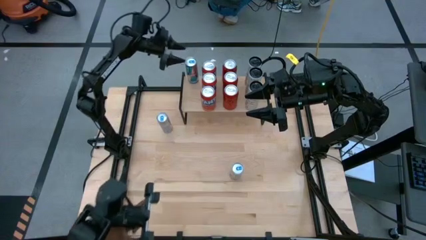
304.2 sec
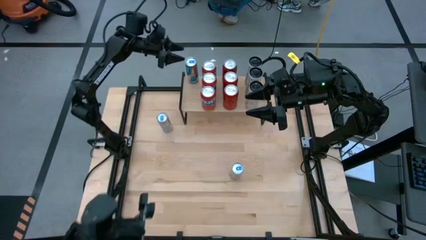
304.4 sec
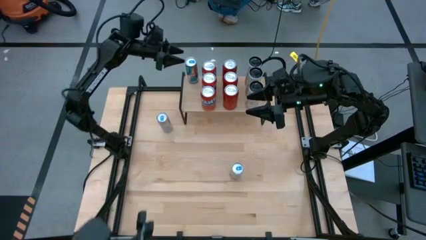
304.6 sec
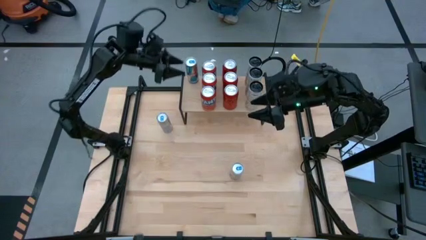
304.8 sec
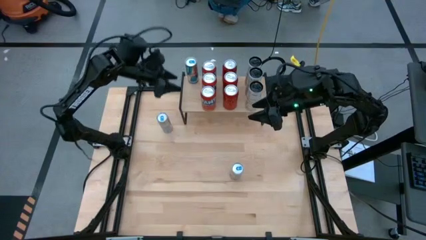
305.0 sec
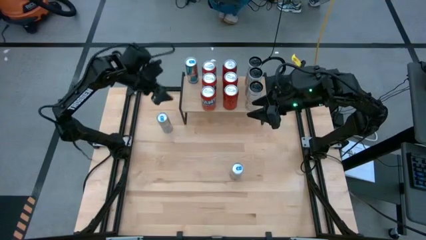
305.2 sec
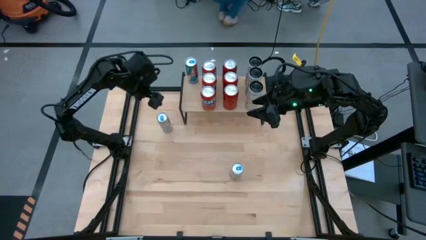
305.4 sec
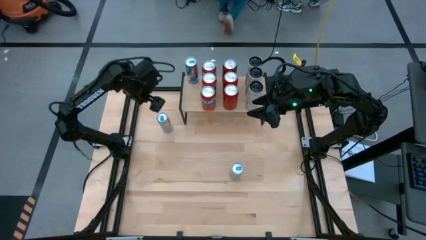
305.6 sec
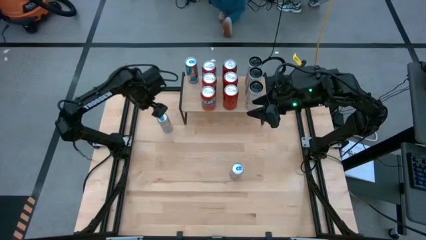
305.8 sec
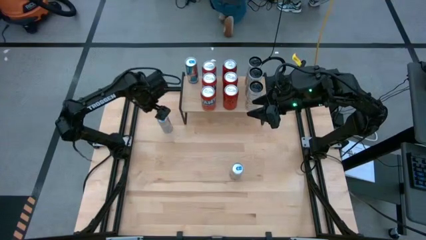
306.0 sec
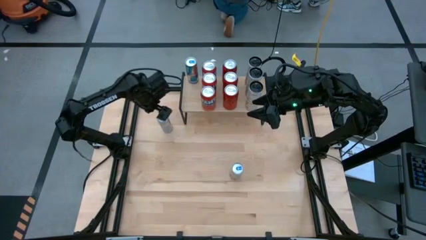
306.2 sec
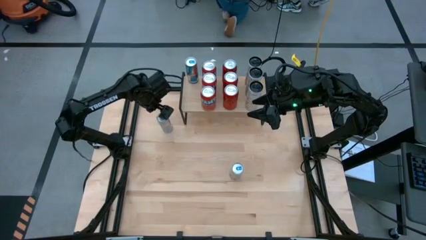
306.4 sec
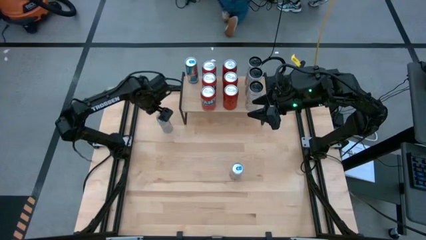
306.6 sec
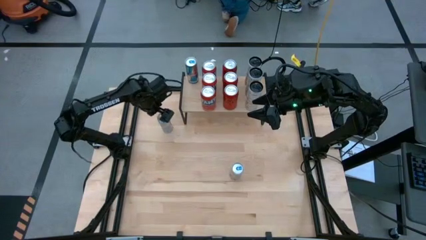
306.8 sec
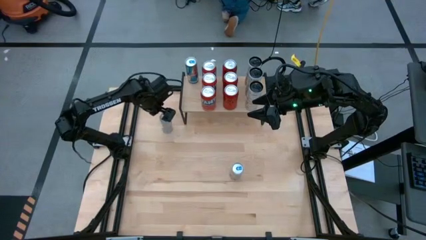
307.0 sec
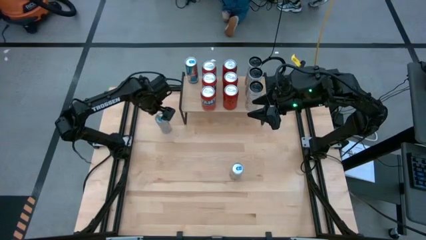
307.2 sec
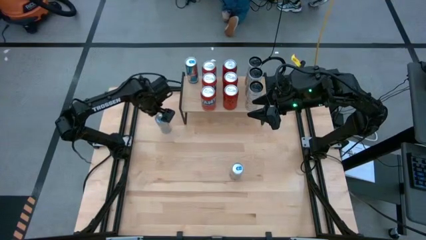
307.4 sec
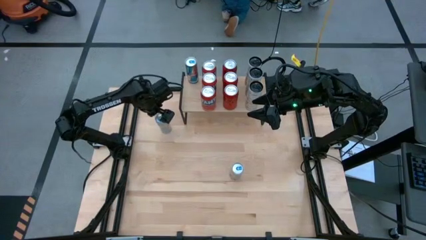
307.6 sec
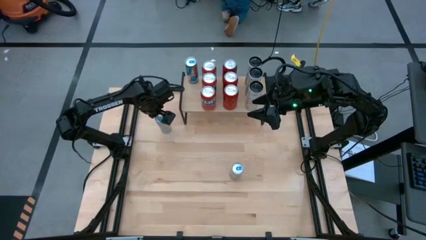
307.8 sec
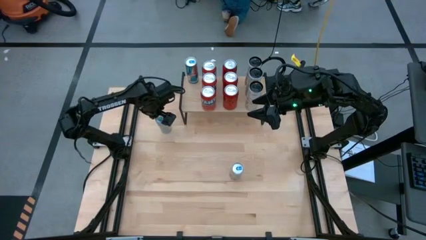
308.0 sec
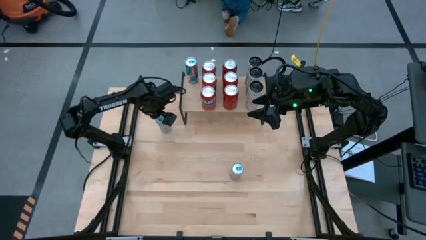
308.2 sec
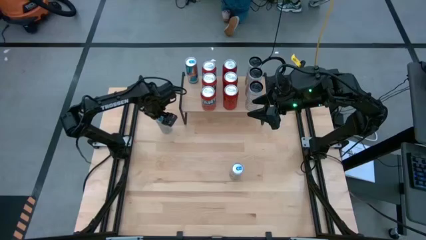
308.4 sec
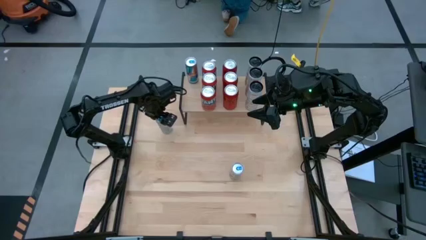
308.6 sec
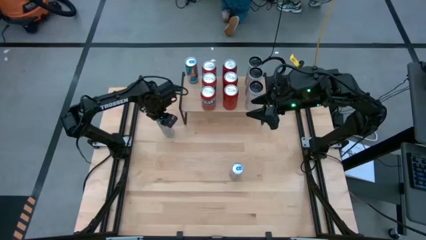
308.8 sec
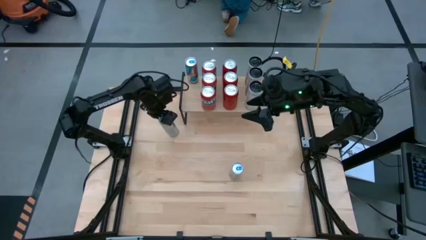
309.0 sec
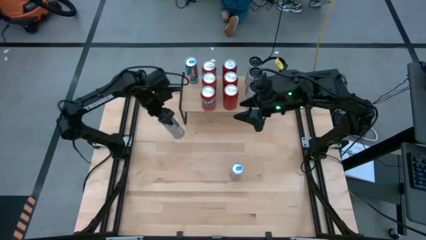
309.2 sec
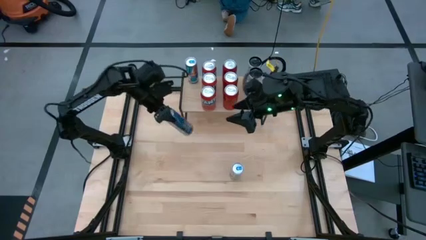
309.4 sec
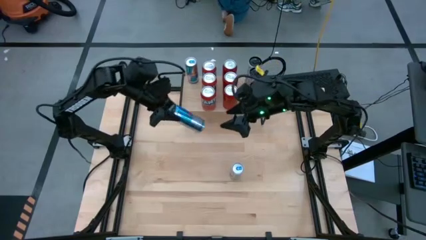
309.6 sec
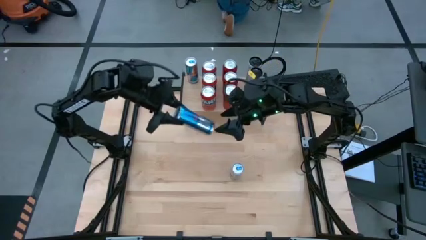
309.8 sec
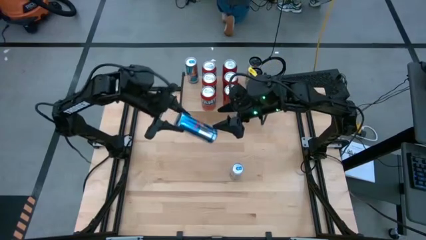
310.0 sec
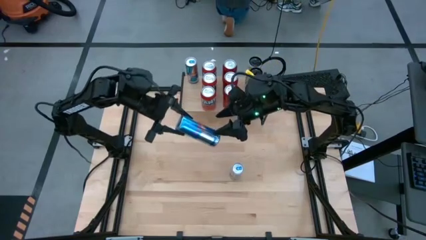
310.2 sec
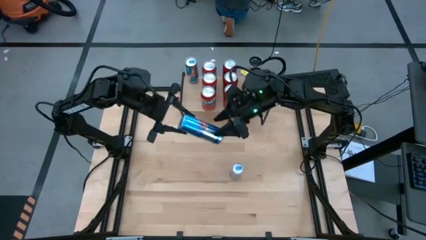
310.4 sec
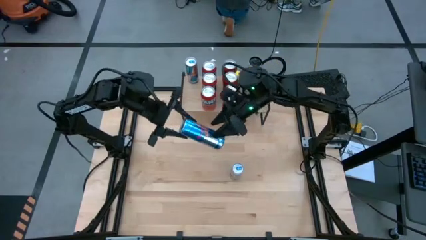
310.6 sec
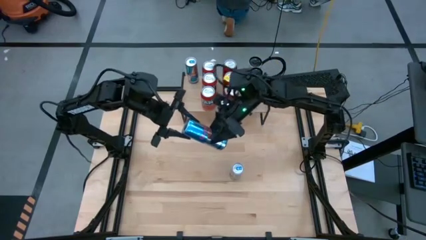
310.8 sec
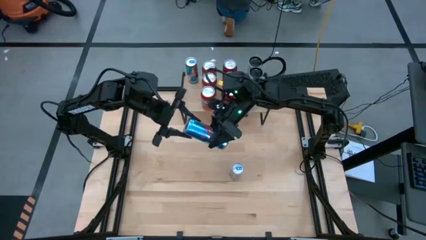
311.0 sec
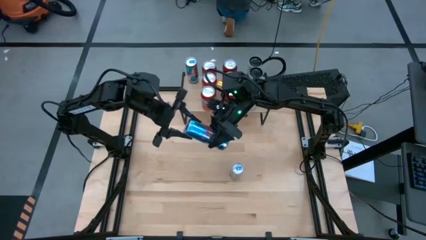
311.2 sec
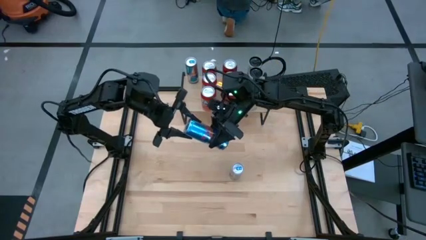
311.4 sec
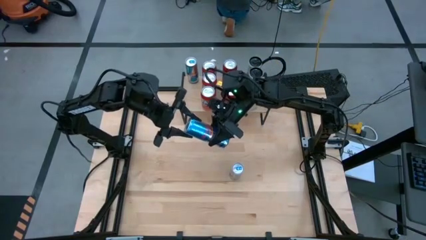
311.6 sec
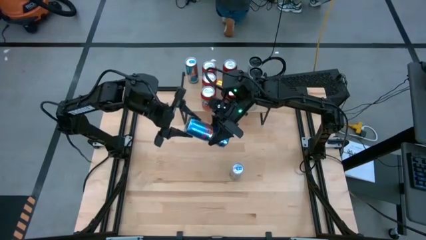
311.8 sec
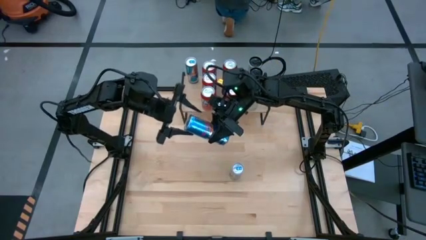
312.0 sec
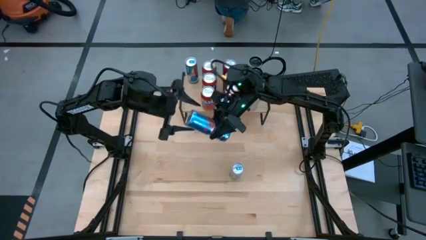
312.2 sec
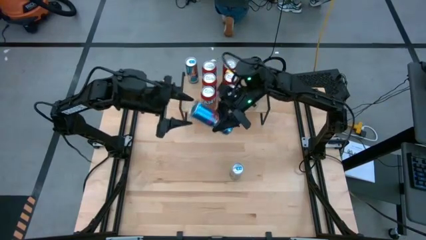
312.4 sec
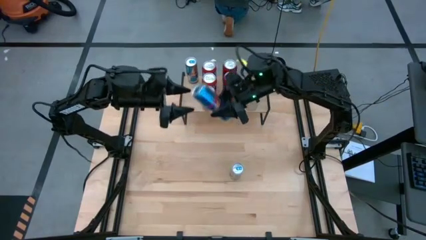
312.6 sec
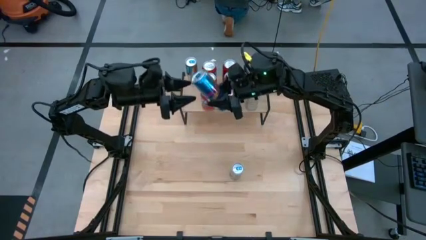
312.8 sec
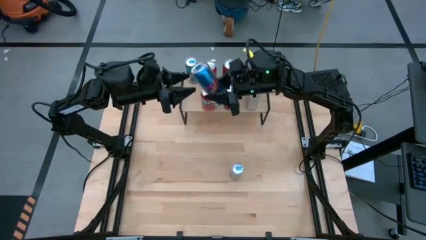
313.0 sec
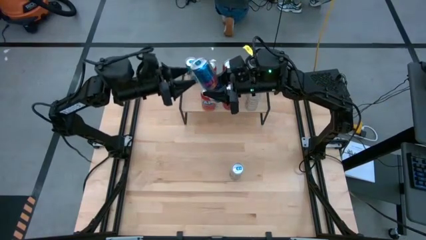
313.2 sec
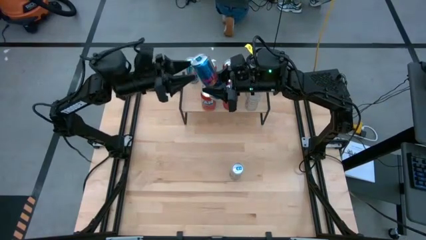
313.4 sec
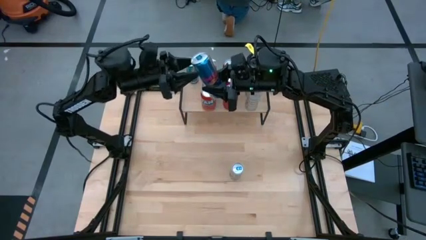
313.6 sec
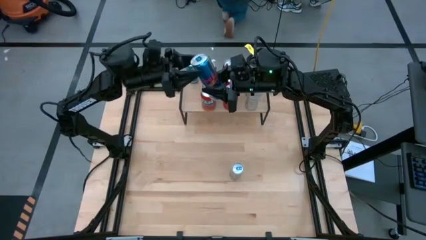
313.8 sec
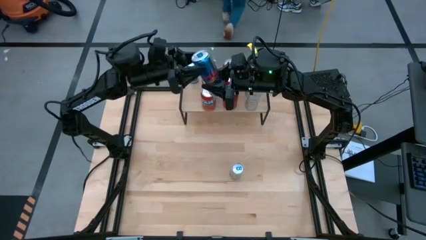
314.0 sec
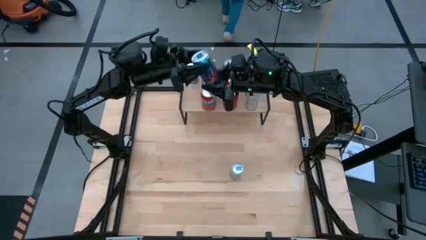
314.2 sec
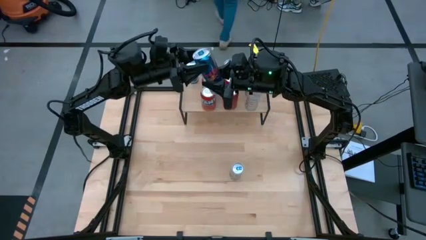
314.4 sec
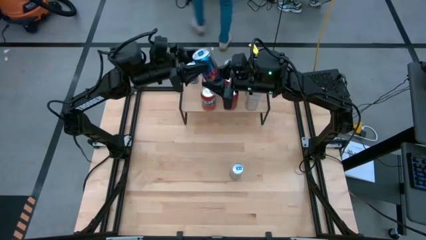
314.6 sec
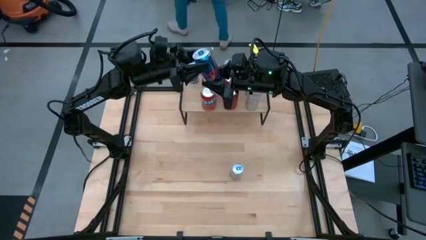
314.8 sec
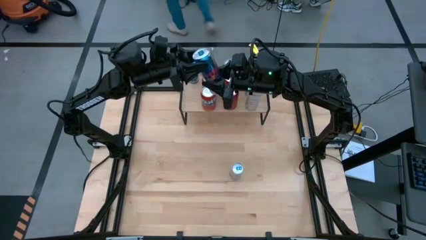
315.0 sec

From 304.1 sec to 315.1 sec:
Task: Place canned beverage on shelf
Put the top blue soda can on the shelf aligned with the other blue soda can

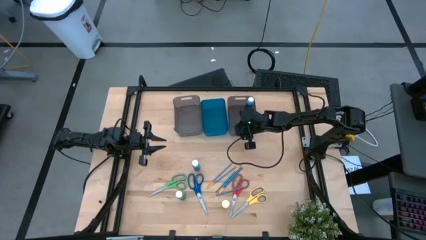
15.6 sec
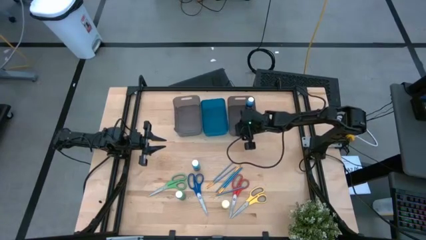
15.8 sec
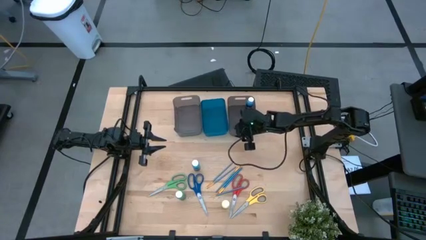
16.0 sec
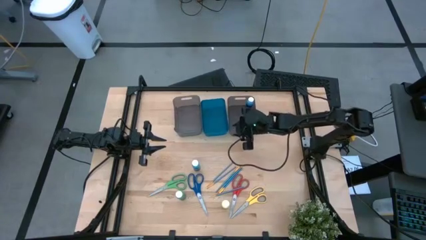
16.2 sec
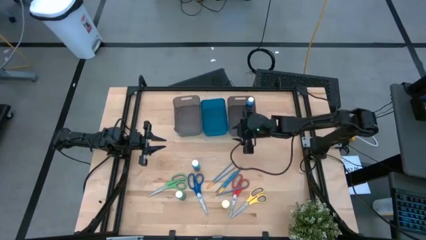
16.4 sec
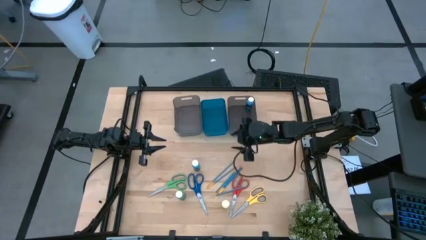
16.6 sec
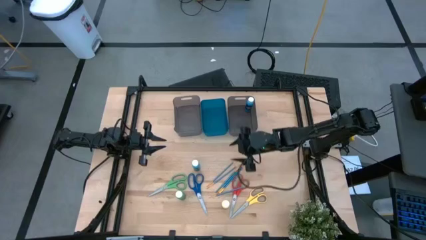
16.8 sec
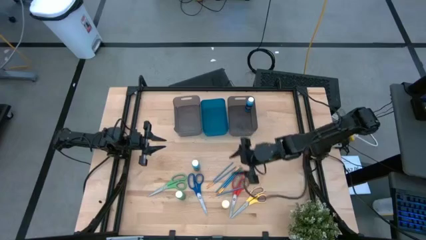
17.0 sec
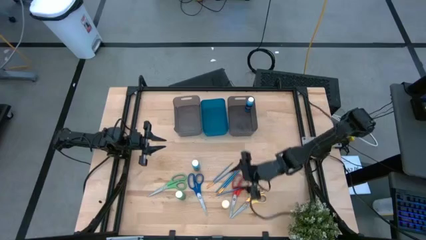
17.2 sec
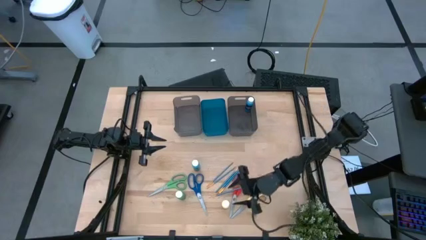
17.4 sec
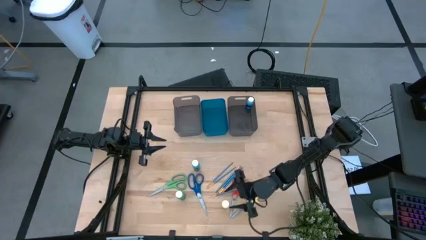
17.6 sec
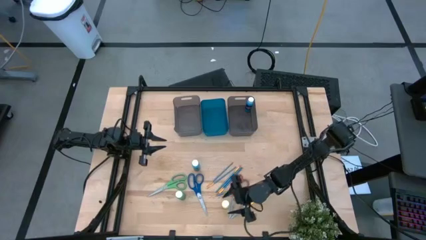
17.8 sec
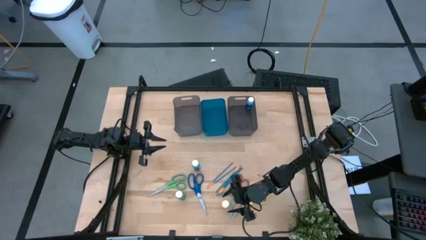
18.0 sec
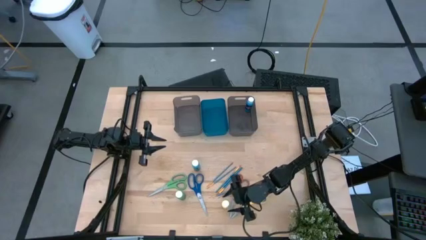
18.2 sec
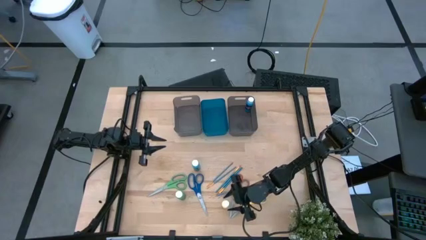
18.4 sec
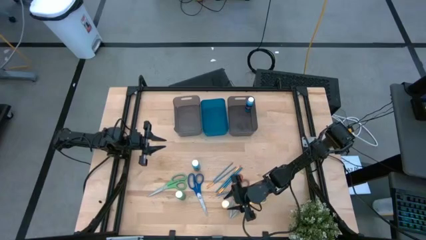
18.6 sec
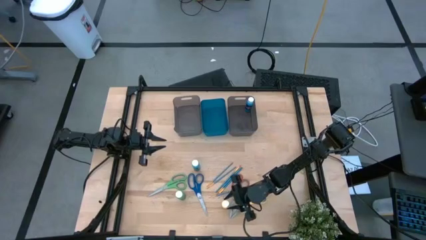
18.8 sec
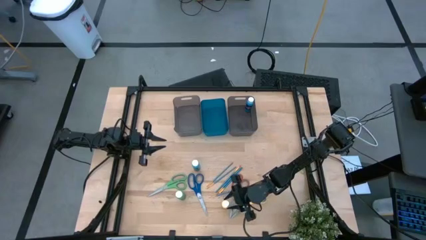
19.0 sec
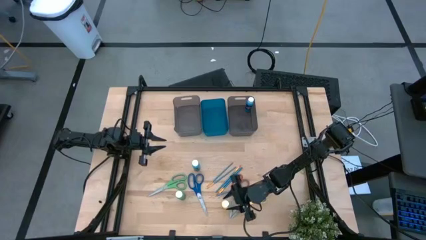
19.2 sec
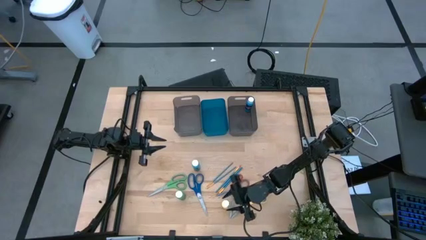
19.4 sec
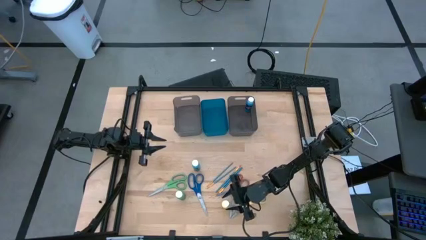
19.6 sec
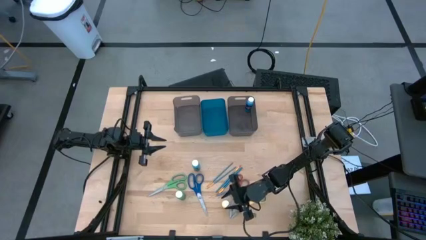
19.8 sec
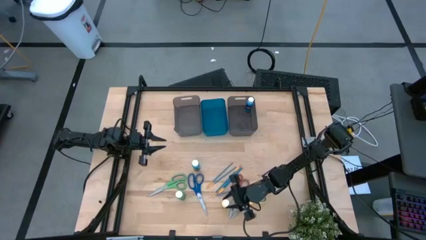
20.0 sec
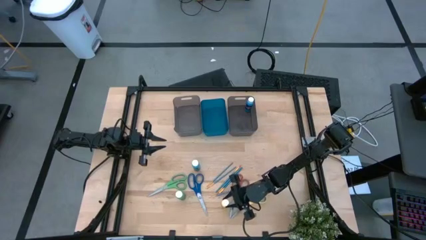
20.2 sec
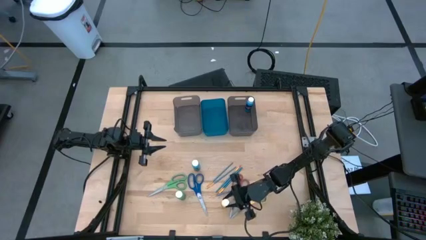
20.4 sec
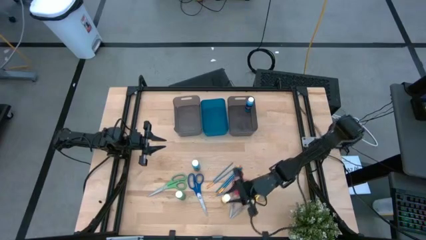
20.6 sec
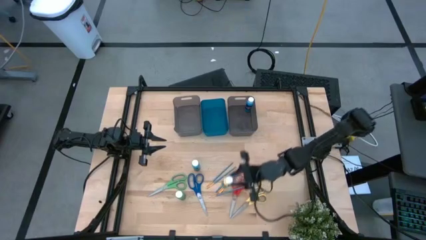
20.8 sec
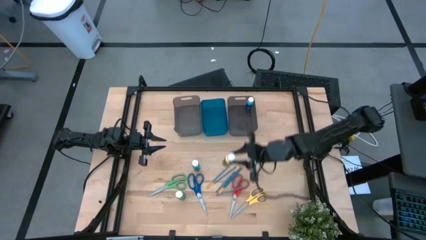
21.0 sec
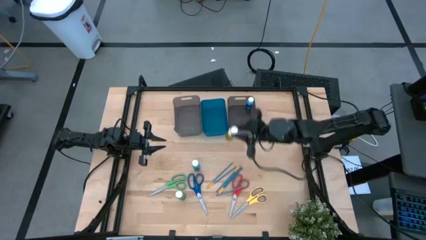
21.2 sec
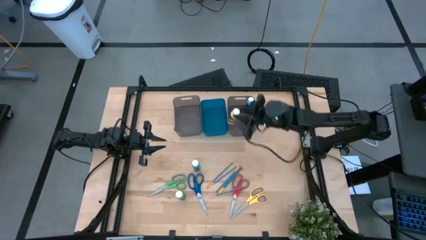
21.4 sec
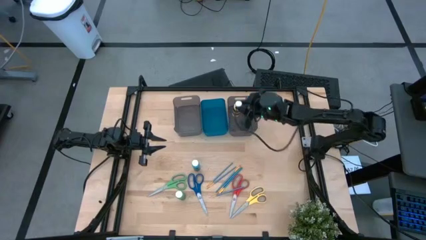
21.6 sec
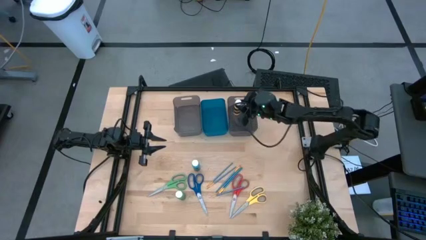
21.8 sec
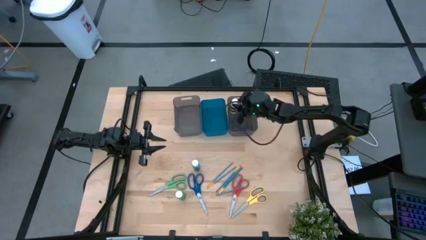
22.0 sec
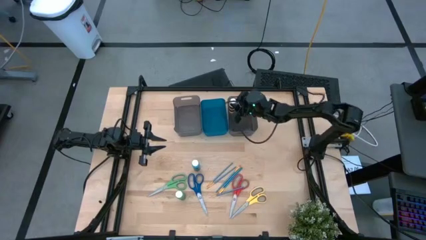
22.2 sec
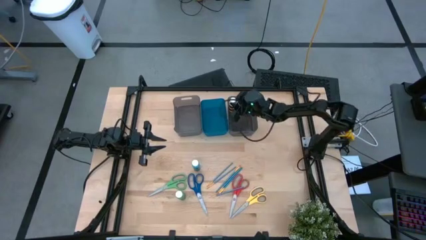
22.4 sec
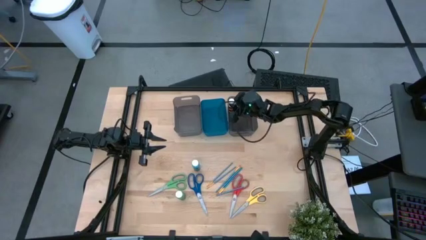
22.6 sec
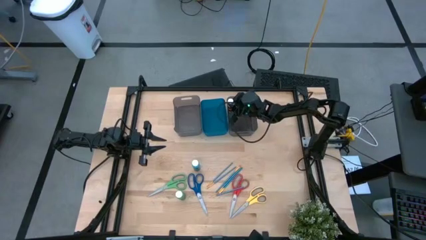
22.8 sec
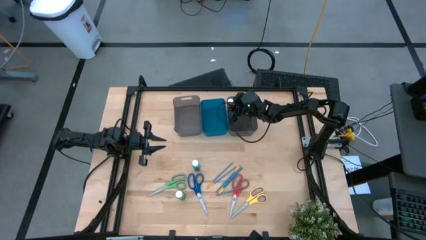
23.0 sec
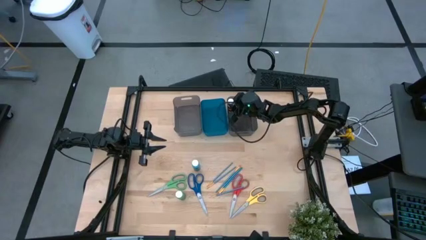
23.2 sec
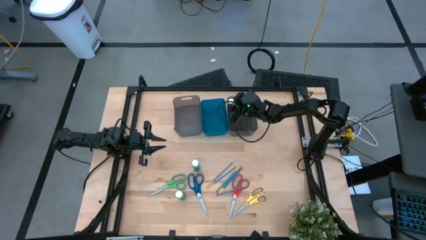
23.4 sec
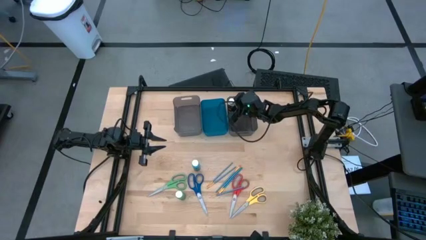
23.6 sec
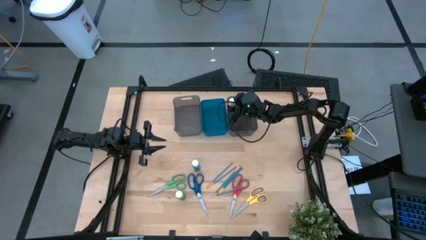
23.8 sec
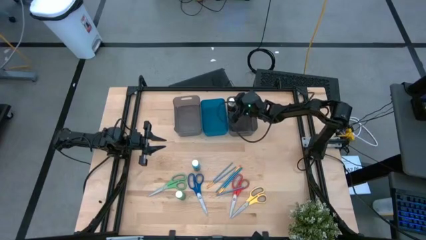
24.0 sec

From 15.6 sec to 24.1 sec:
Task: Pick & Place Paint Supplies
Put the yellow coloring bottle into the right gray bin
